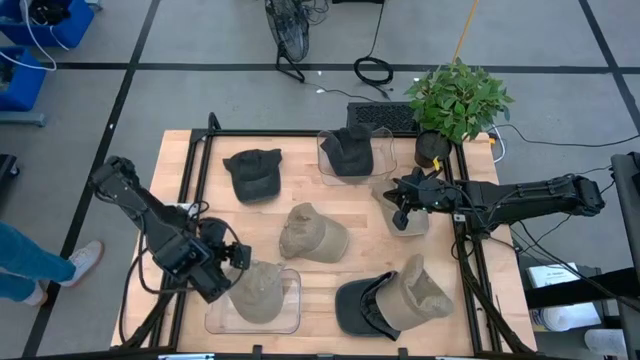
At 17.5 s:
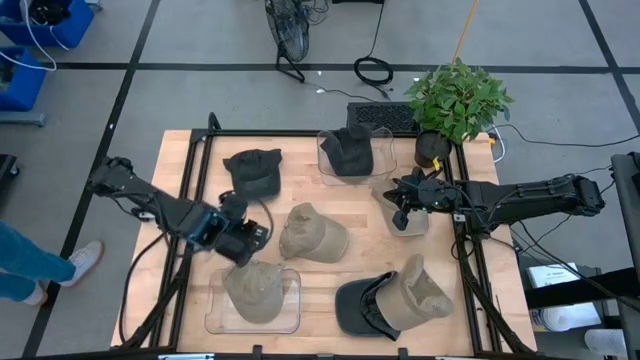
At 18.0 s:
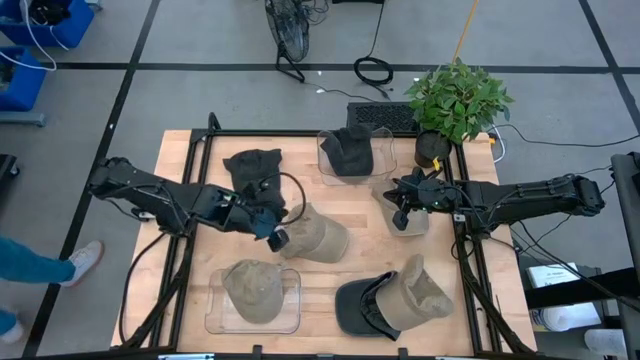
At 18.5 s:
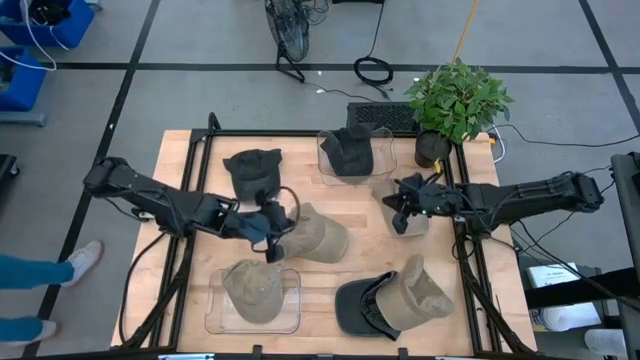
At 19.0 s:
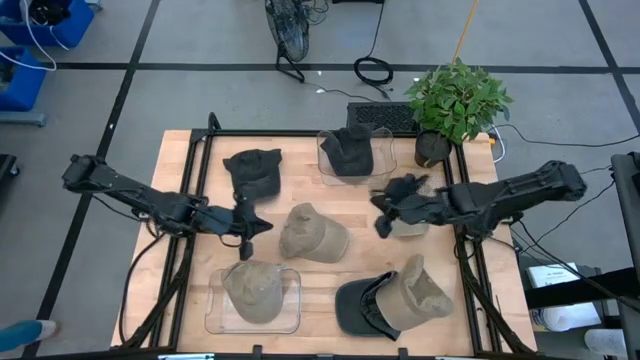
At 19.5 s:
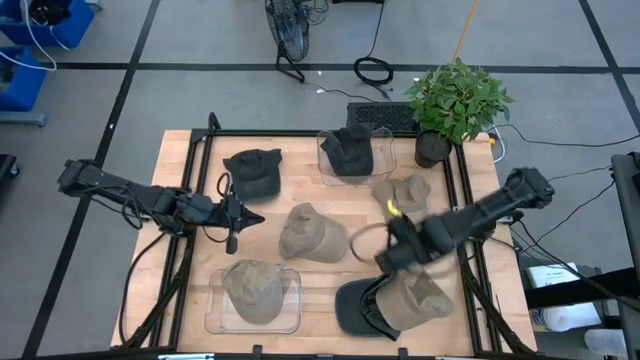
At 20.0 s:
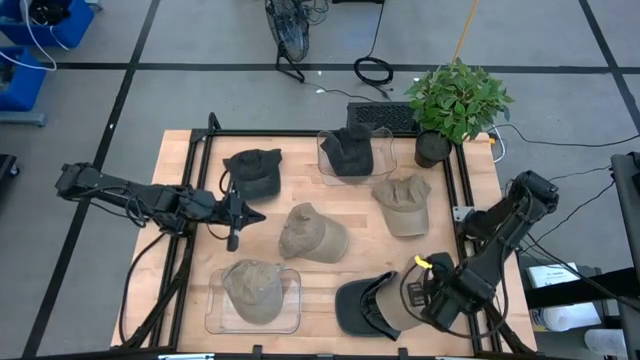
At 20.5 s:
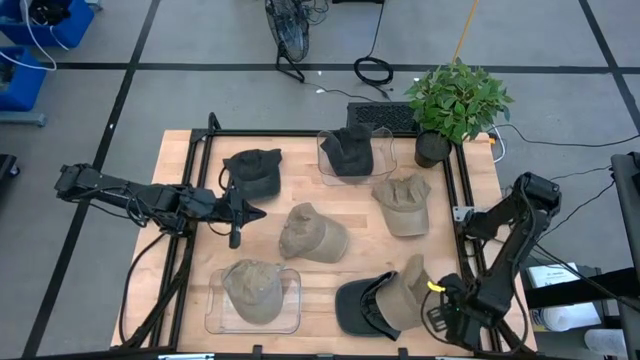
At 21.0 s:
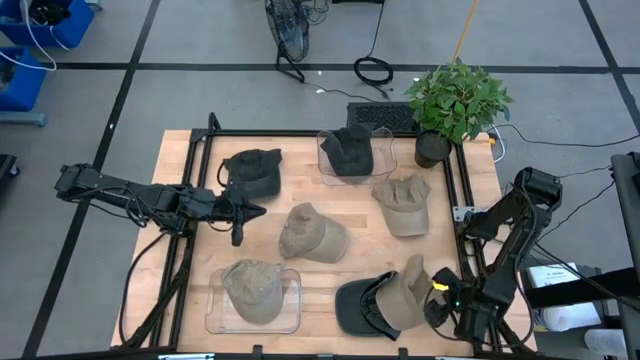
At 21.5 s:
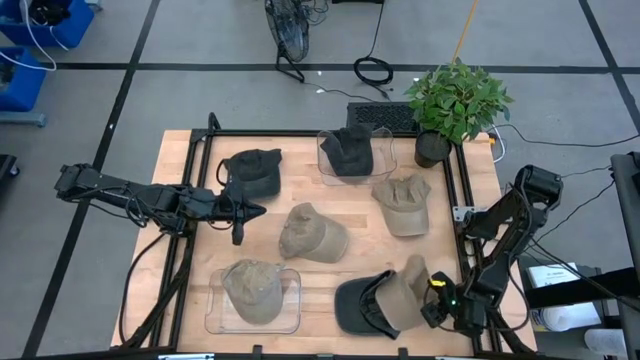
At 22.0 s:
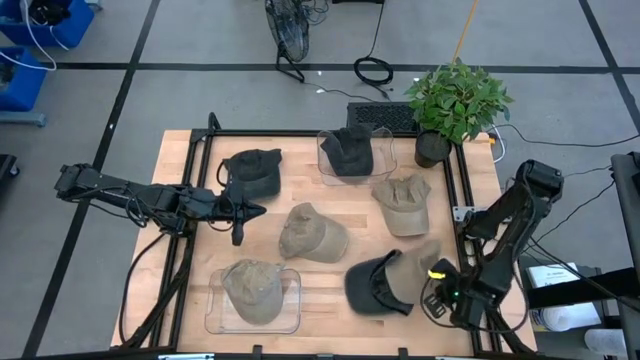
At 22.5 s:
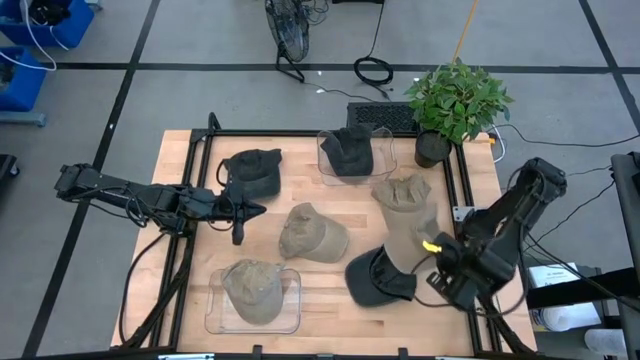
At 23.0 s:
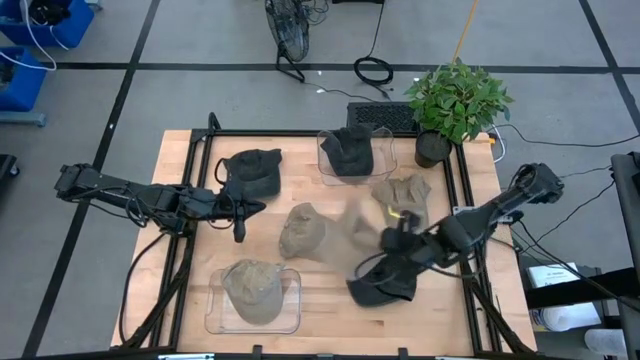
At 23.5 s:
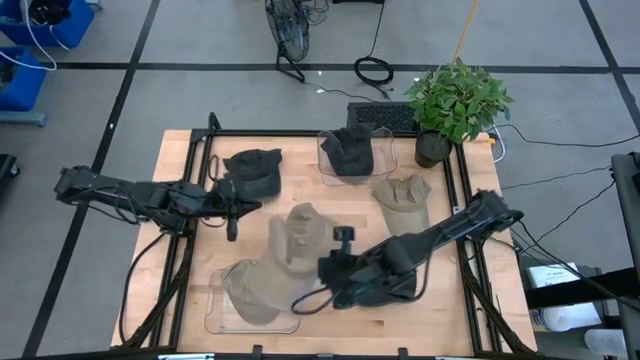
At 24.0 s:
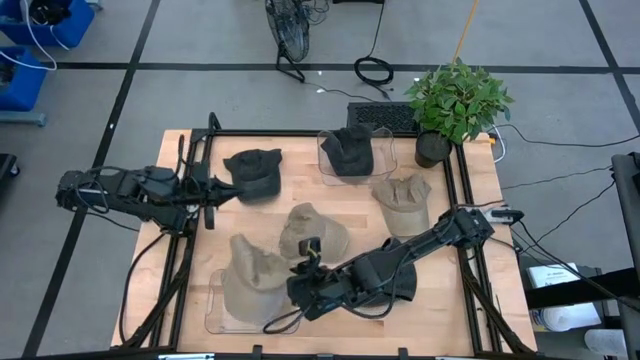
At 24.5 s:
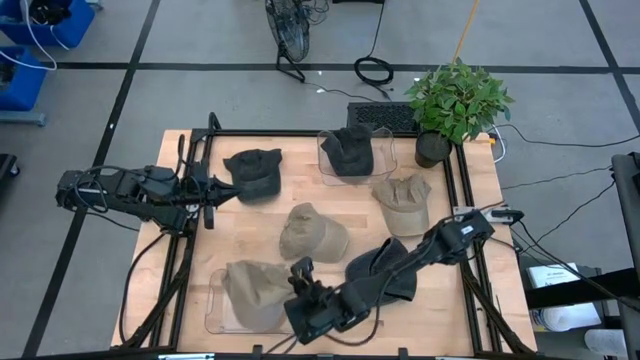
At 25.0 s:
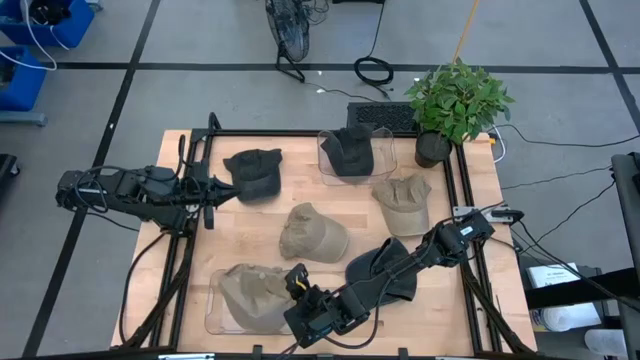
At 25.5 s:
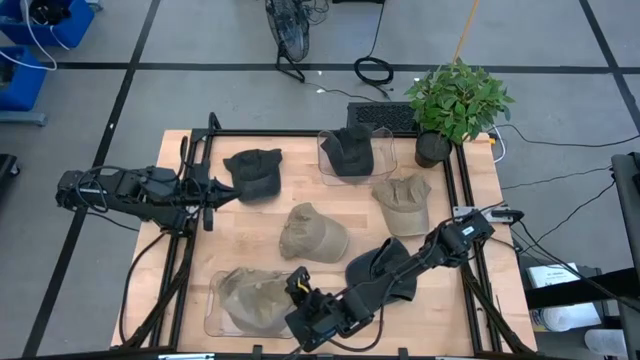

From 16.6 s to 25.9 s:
Task: Pick & Place hat
Put the brown cap into the bottom transparent bin

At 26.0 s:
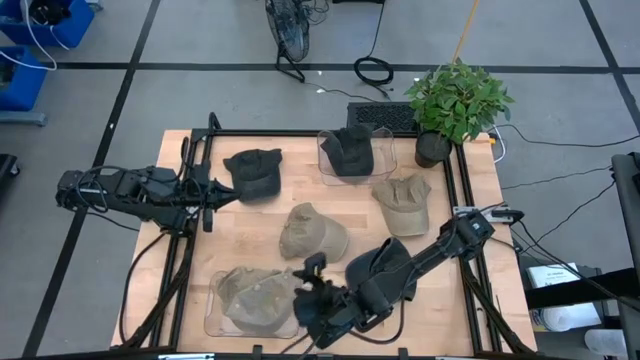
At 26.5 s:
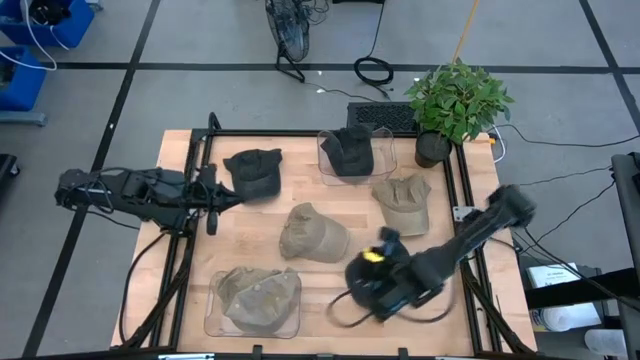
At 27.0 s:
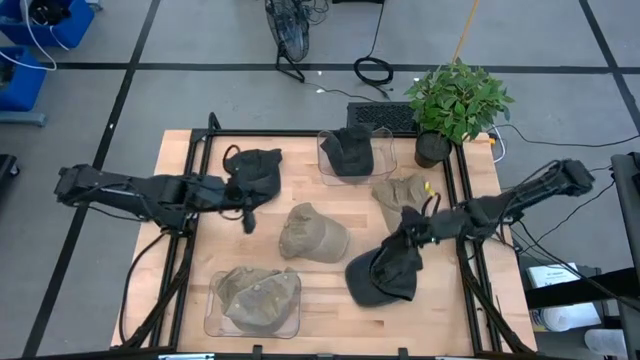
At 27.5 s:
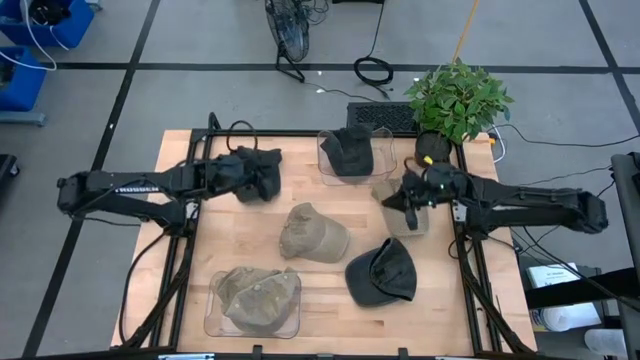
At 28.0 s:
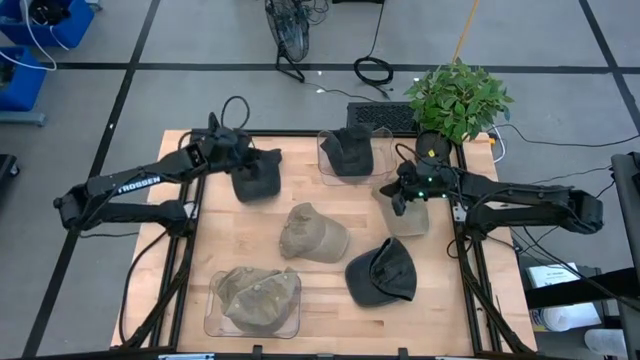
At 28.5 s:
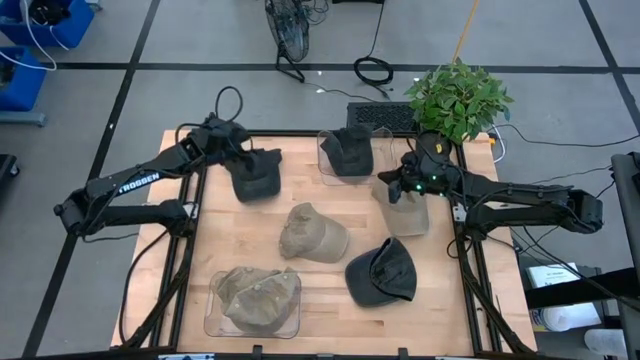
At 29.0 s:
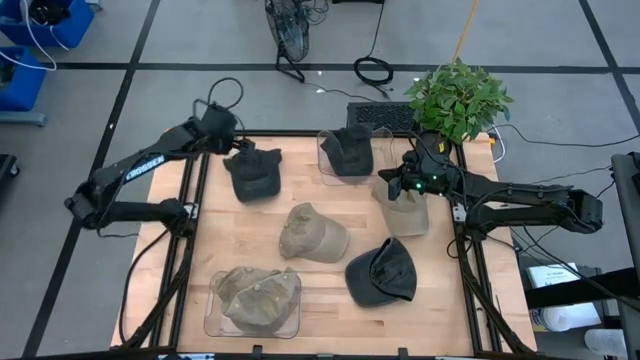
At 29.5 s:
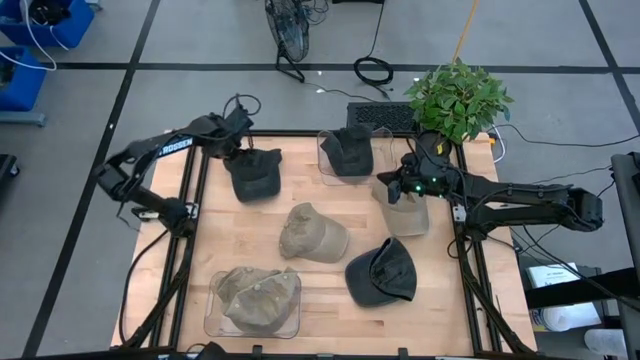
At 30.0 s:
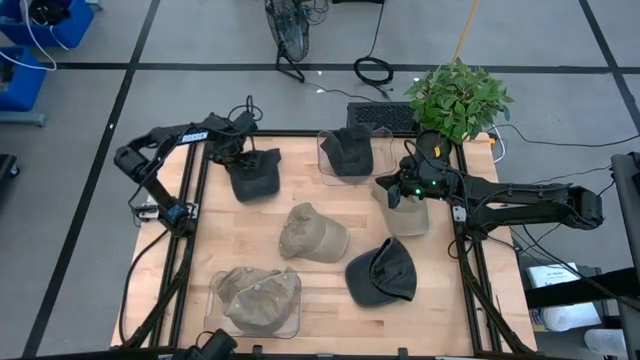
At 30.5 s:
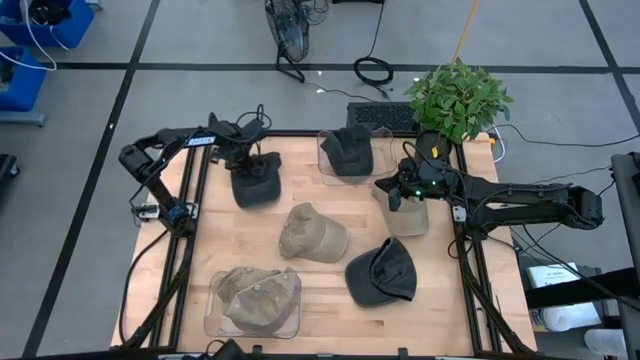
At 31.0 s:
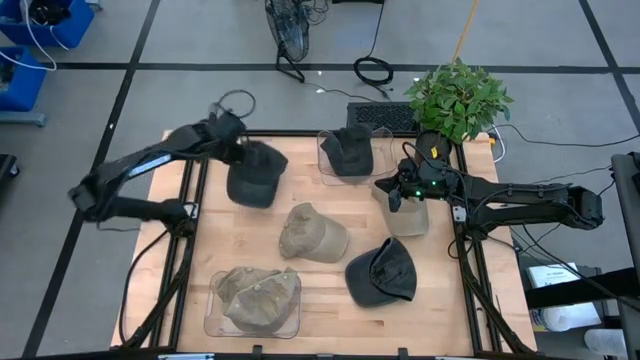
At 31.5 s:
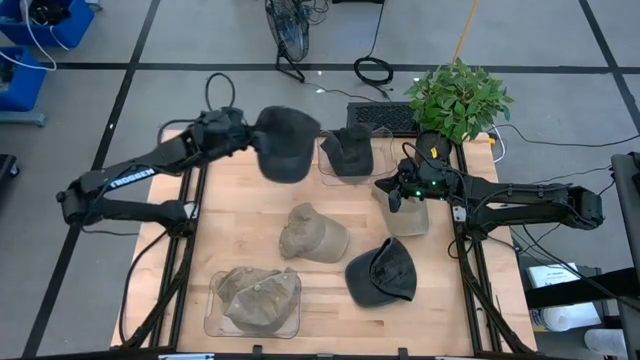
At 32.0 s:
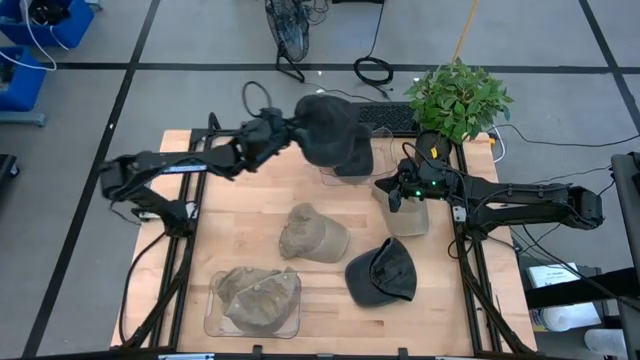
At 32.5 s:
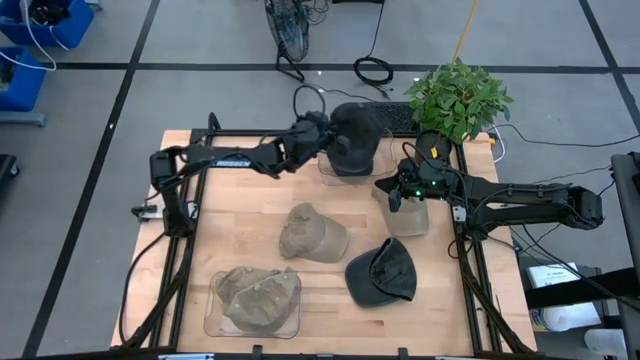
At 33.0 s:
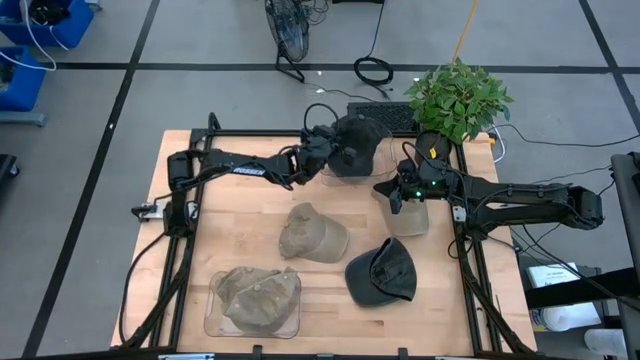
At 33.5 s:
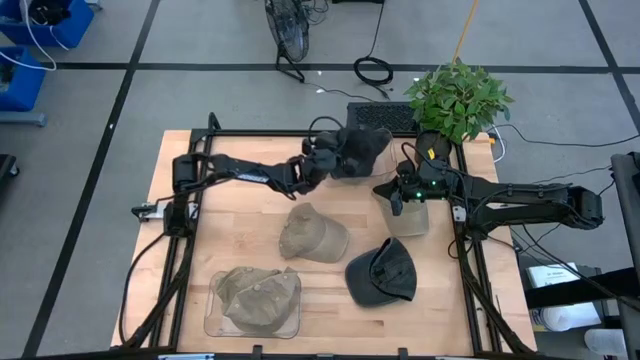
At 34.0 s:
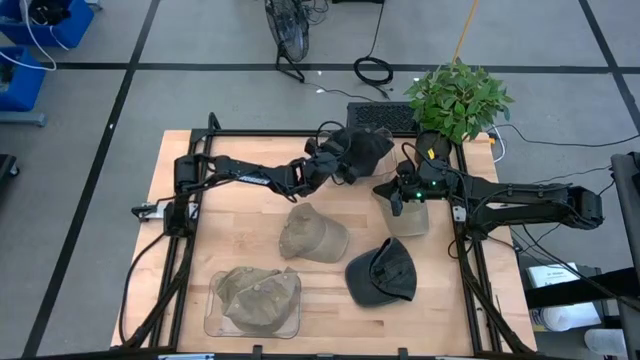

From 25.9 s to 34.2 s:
Put the dark gray cap into the top transparent bin

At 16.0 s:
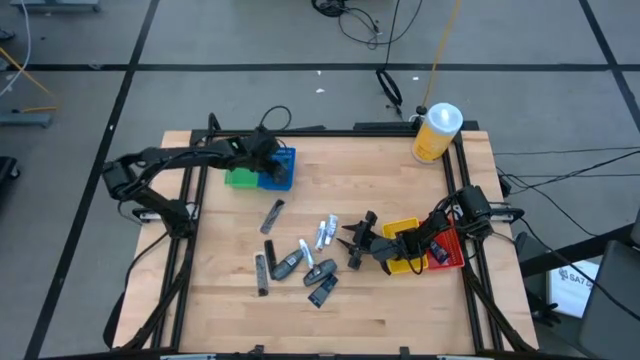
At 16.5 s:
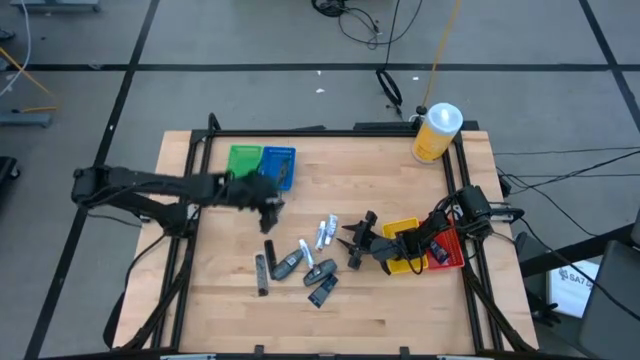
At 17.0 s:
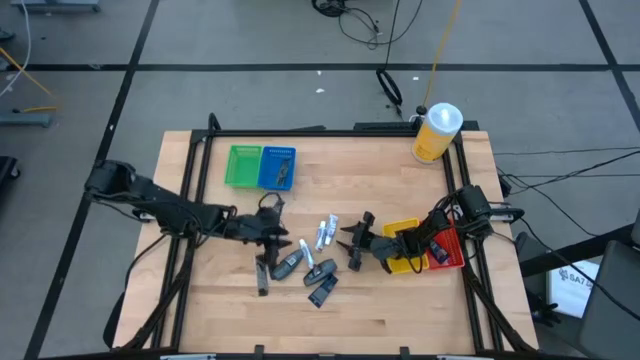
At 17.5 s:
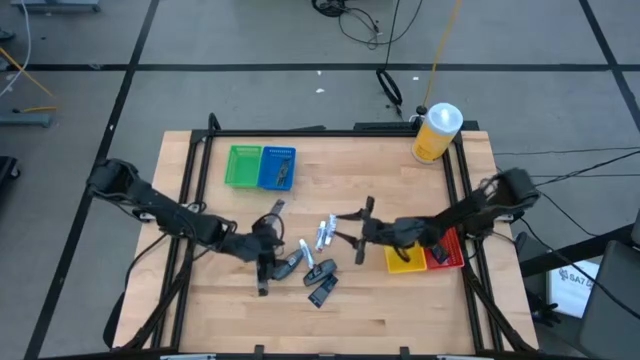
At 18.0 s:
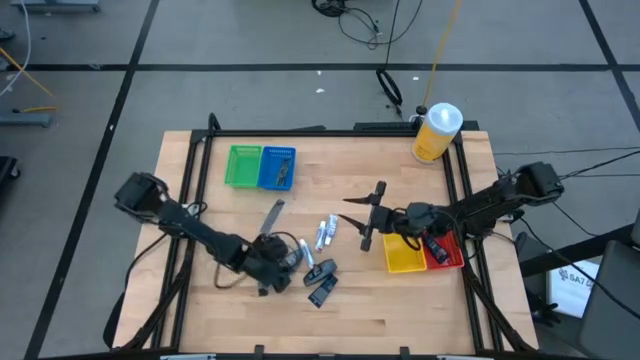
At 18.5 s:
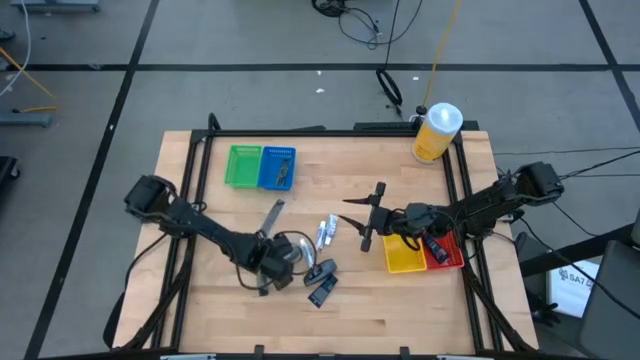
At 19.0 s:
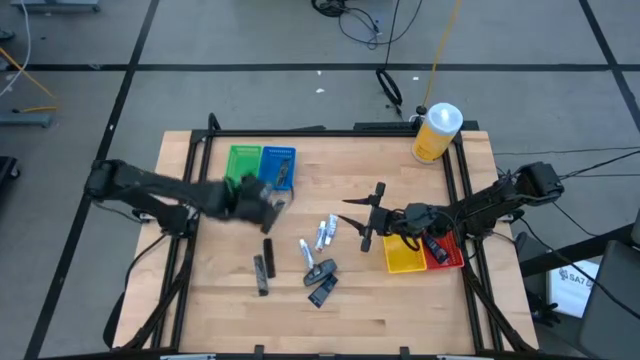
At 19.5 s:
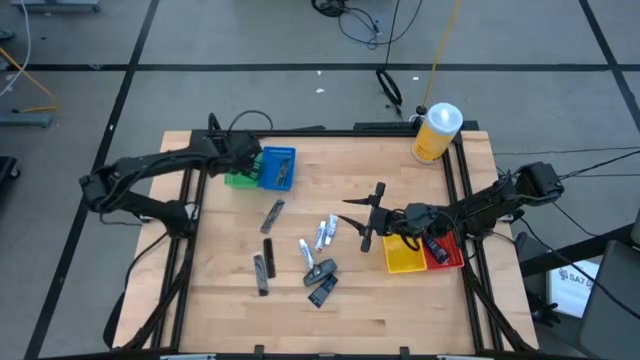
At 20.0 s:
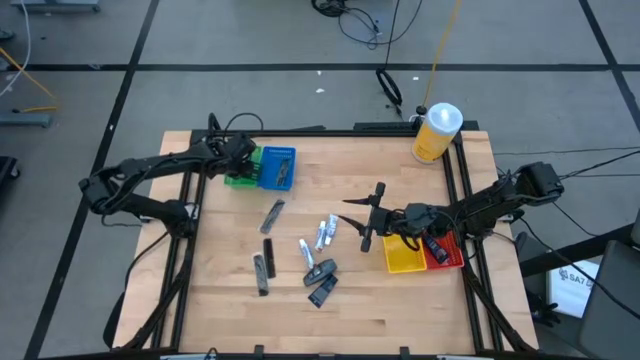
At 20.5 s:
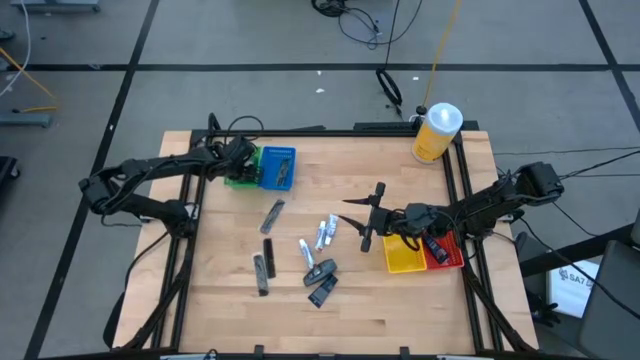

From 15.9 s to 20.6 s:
Task: Pick & Place Travel size toiletries
Put the black deodorant into the green bin
